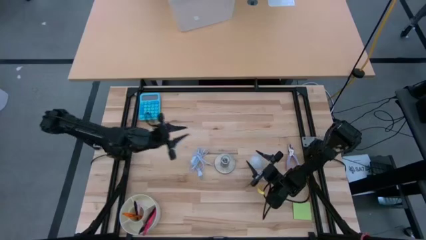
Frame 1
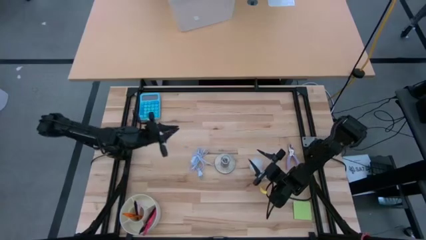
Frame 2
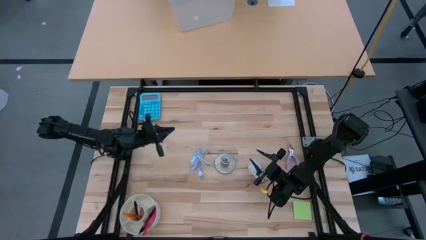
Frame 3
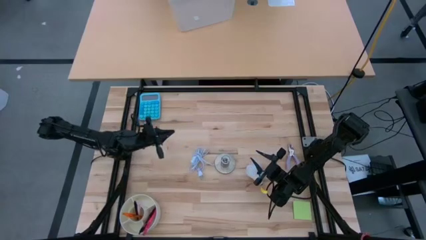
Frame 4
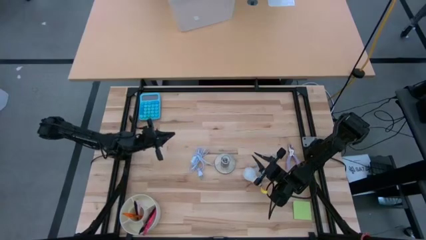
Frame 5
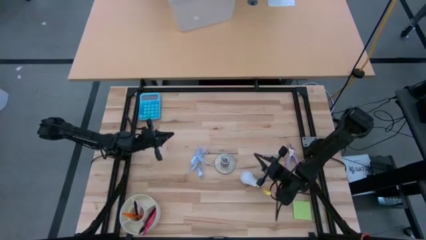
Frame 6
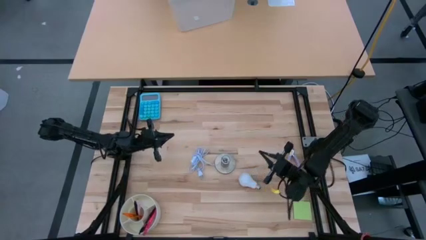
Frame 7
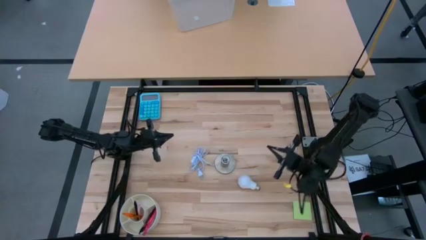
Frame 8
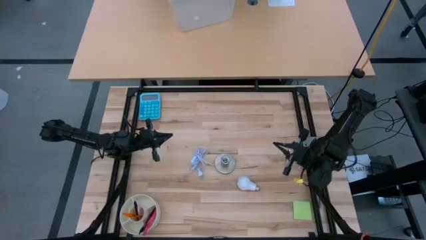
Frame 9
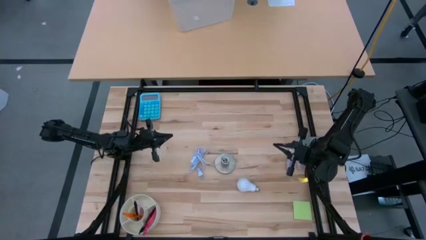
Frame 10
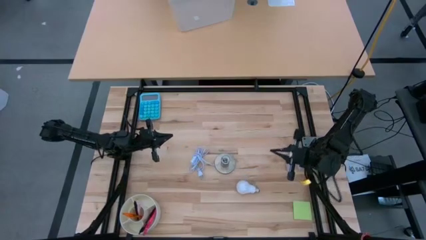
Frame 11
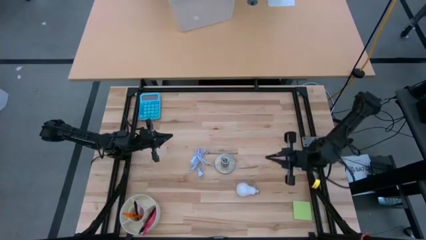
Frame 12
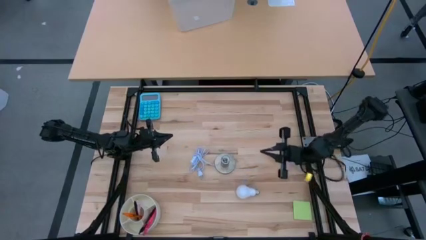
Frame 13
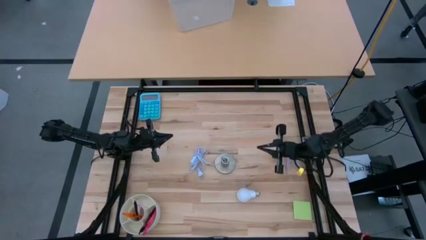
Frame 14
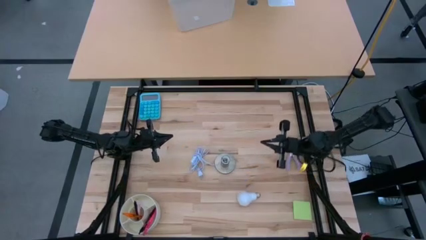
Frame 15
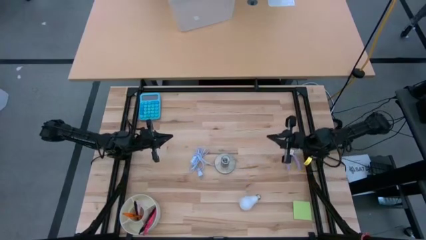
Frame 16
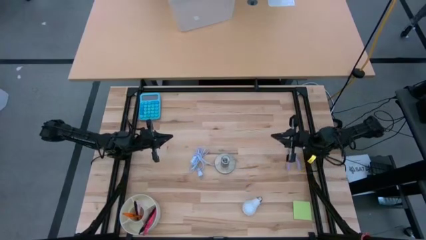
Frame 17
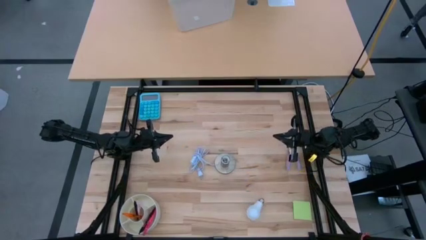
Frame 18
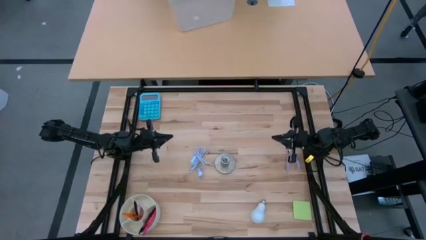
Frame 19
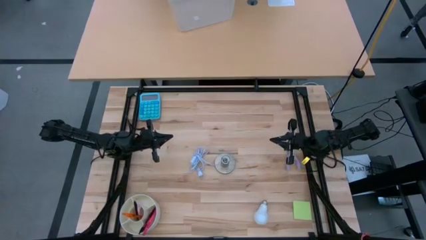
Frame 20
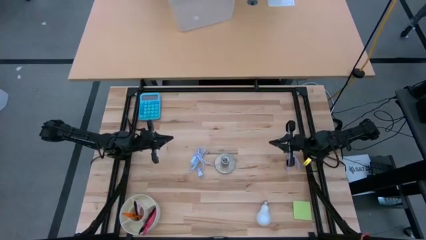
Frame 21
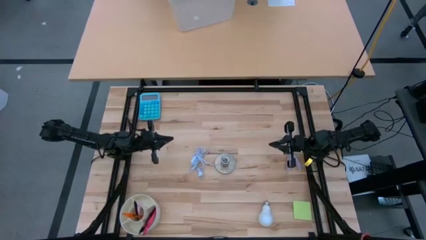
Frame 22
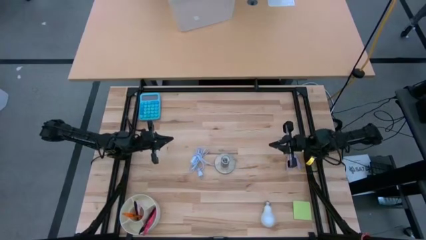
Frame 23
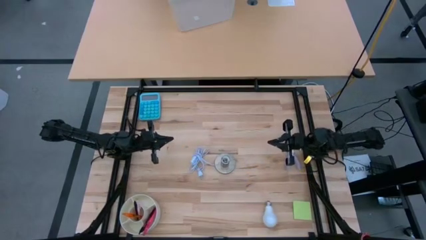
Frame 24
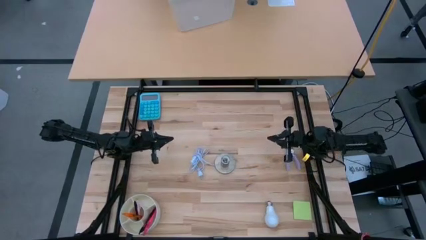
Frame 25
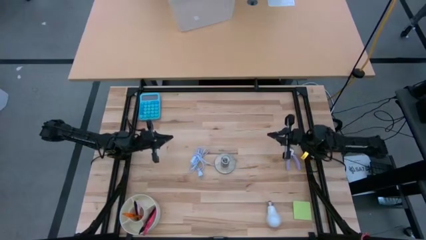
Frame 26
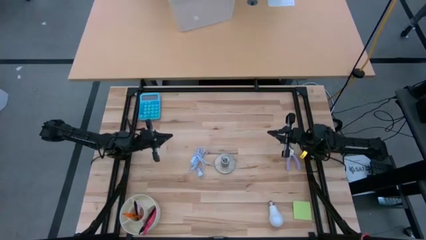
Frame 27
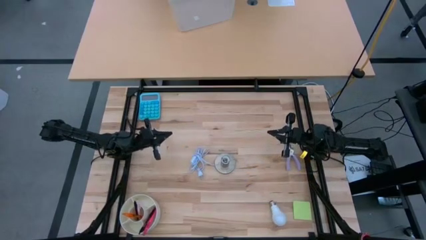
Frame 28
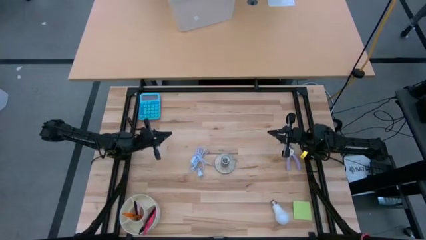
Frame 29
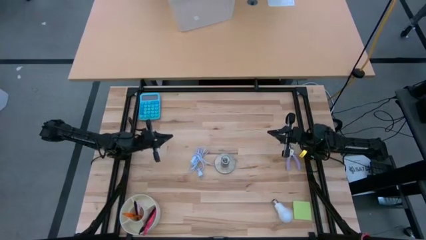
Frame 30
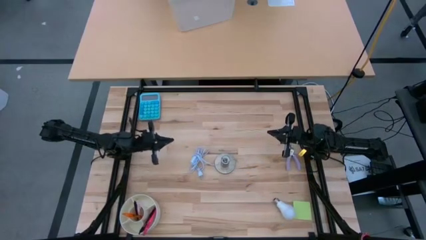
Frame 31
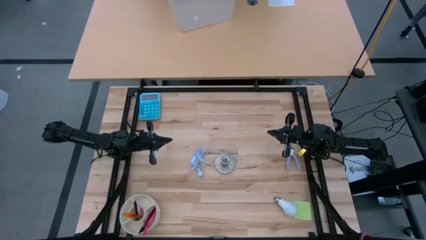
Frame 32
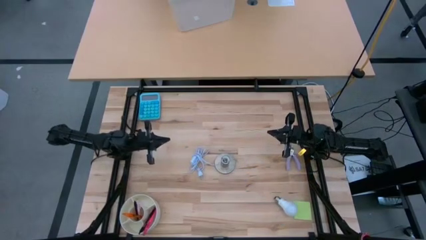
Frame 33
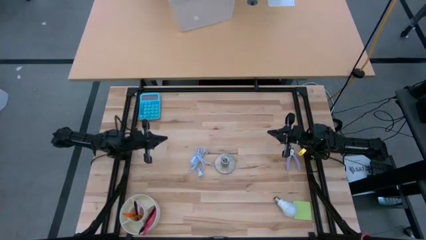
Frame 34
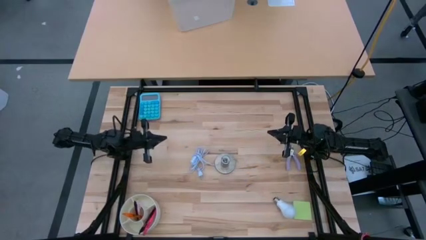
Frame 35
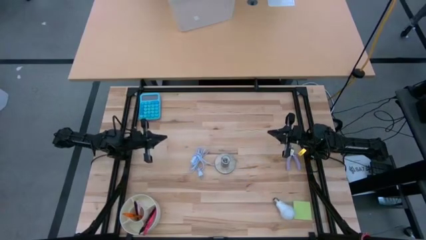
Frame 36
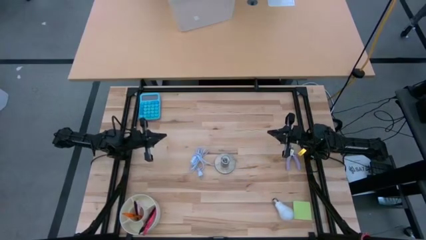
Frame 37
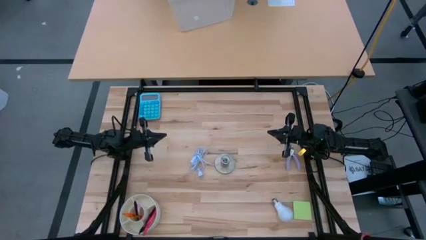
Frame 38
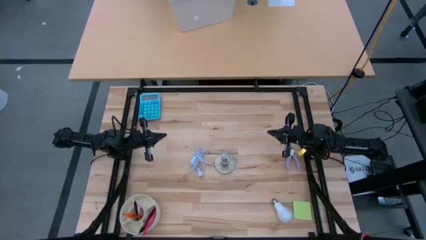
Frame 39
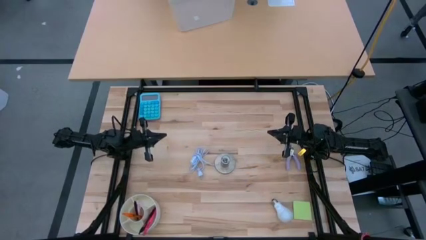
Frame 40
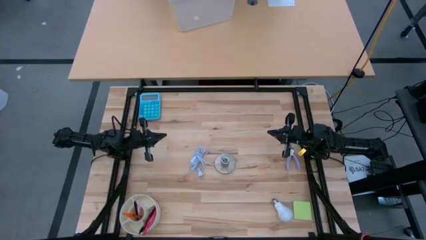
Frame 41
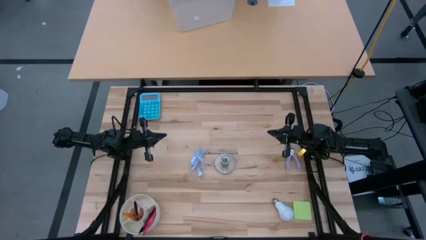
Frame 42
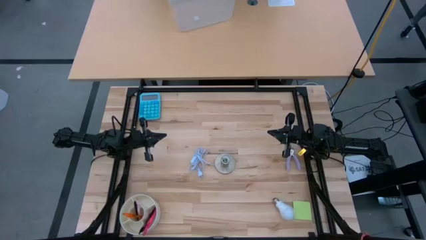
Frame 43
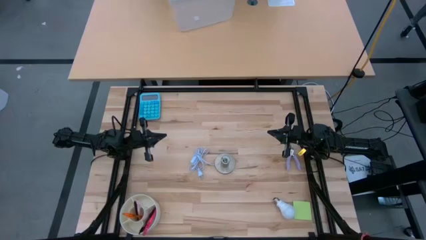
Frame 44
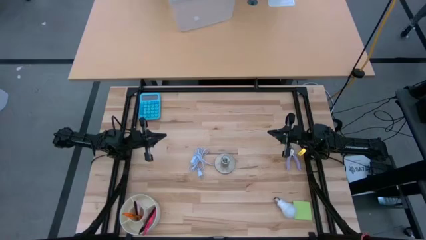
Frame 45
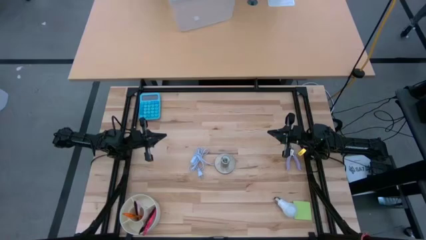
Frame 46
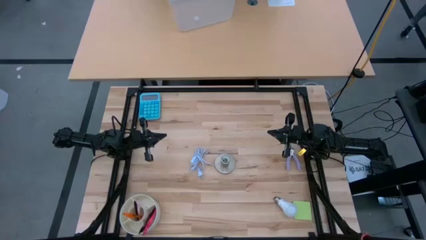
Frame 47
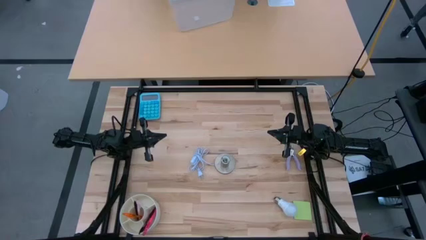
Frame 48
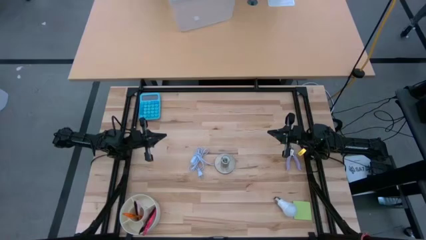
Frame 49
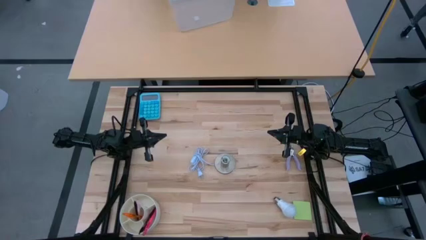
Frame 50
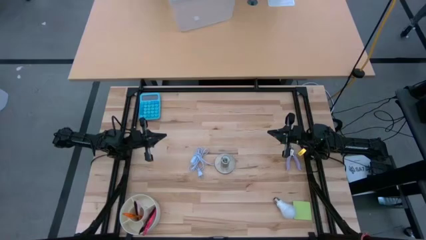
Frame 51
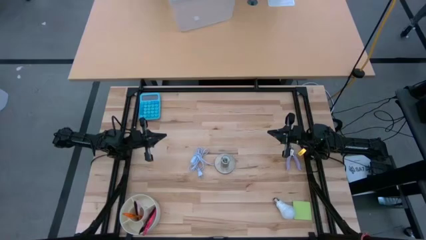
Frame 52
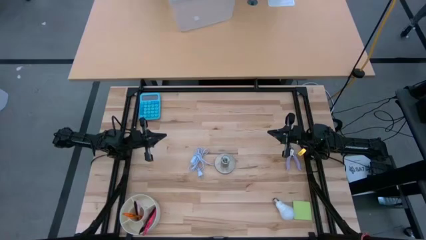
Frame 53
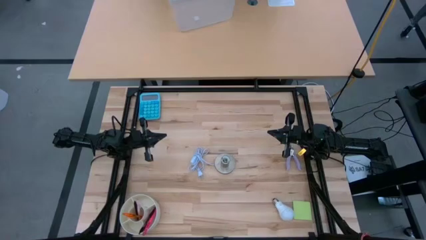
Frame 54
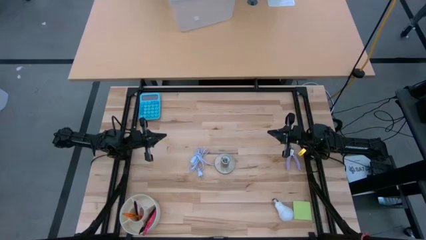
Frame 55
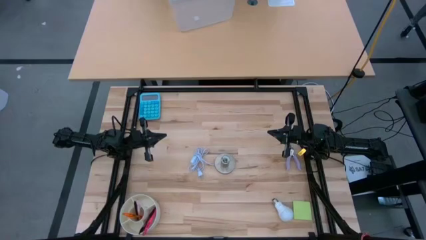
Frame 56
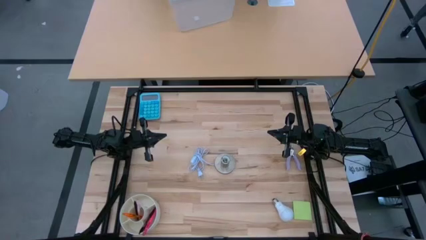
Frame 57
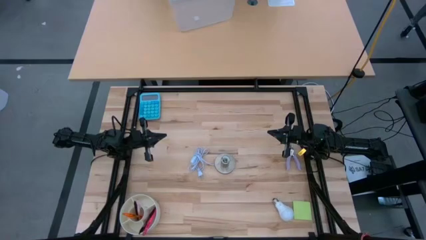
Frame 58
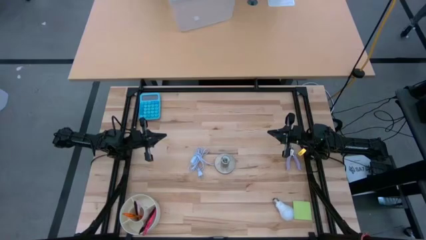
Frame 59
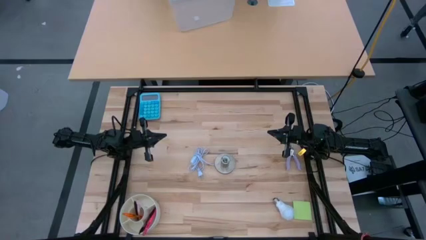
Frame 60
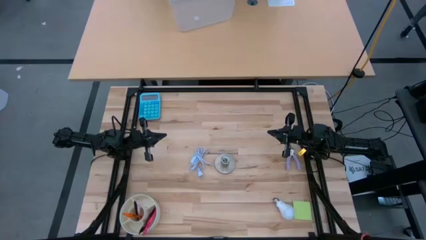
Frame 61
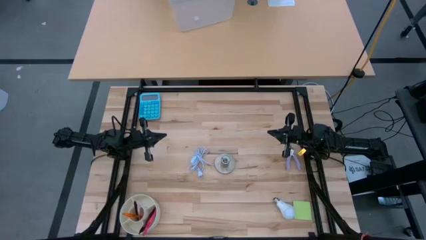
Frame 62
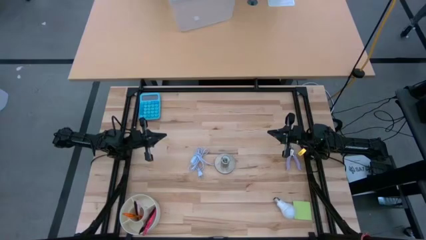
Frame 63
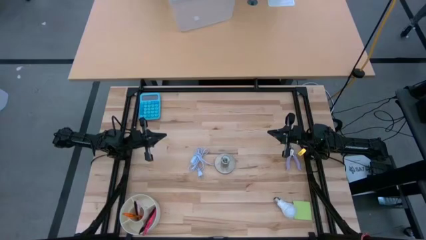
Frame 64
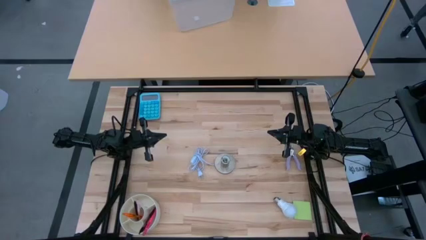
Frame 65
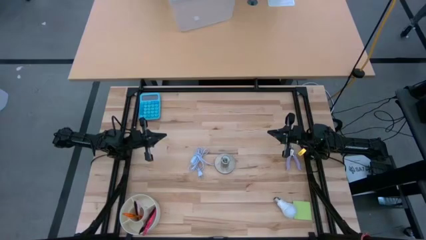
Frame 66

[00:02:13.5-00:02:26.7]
Task: Screw lightbulb
Return to Home Position
